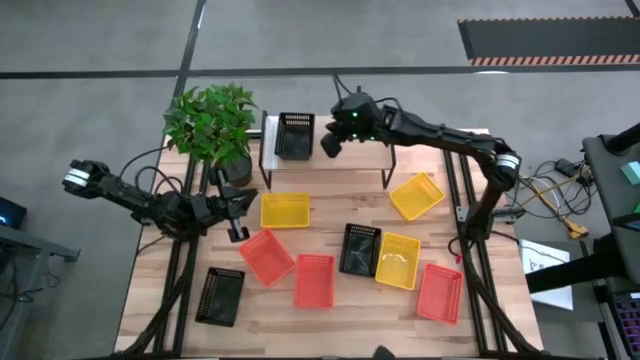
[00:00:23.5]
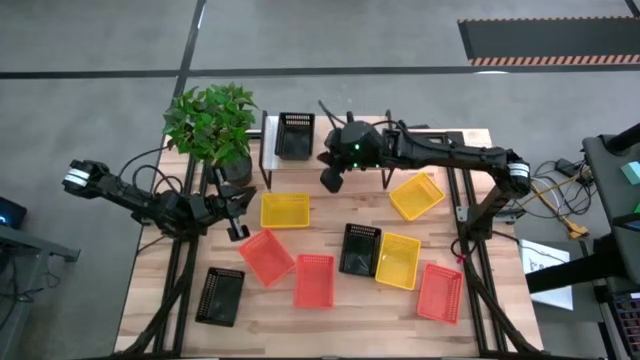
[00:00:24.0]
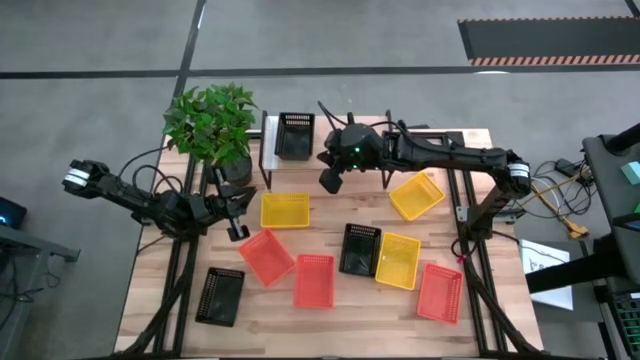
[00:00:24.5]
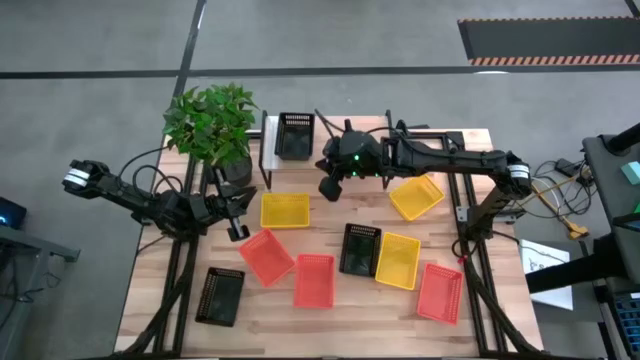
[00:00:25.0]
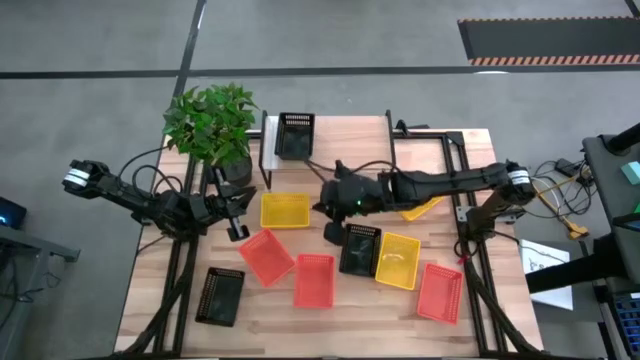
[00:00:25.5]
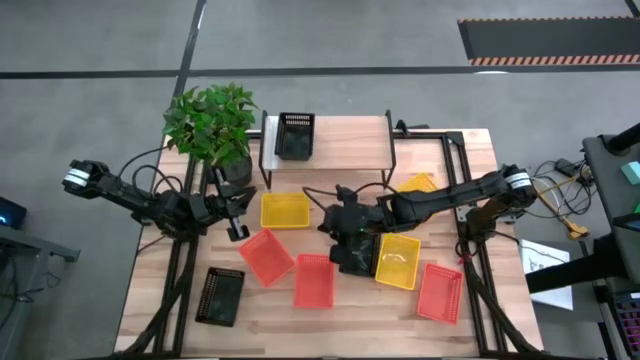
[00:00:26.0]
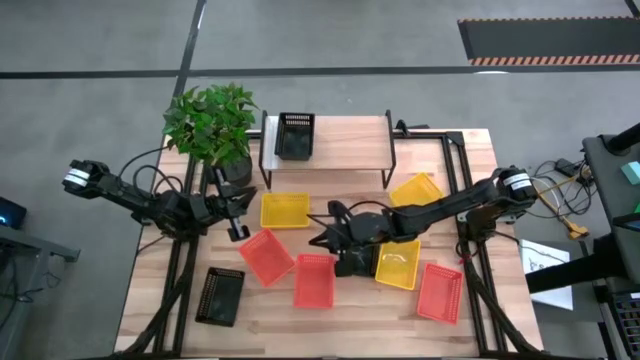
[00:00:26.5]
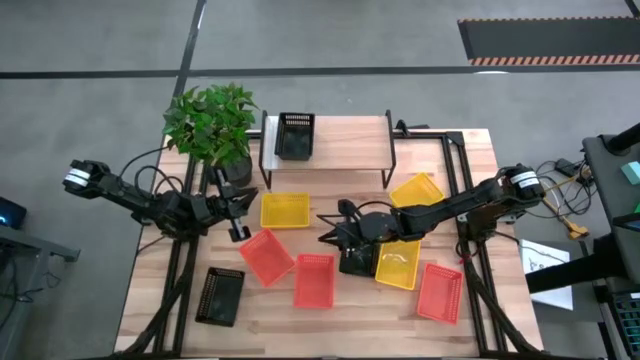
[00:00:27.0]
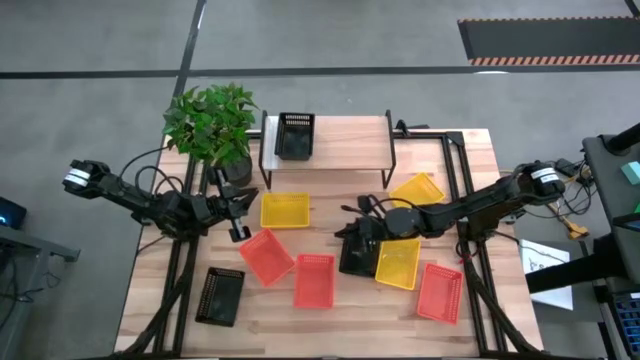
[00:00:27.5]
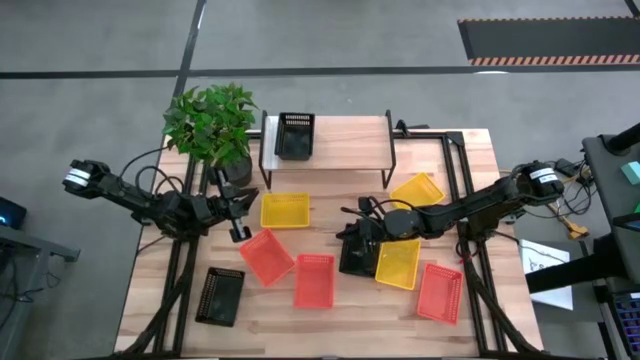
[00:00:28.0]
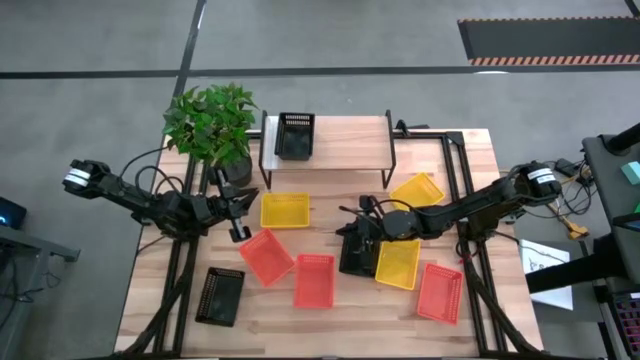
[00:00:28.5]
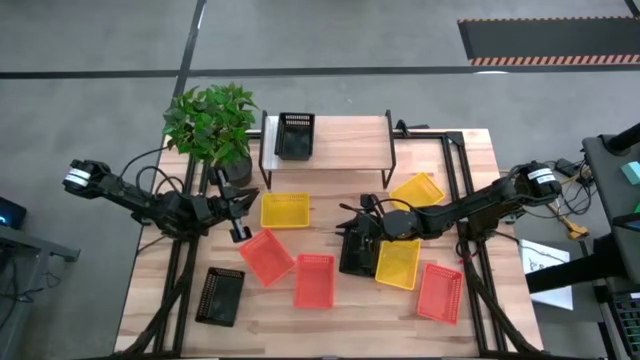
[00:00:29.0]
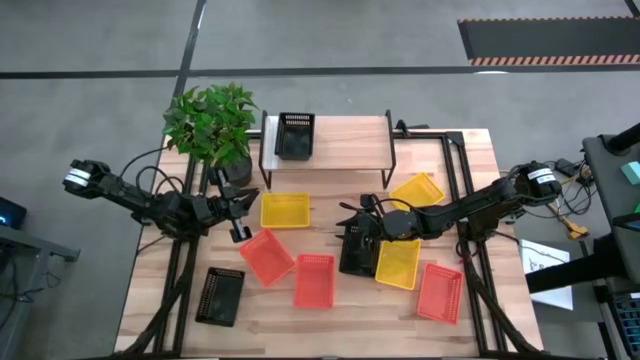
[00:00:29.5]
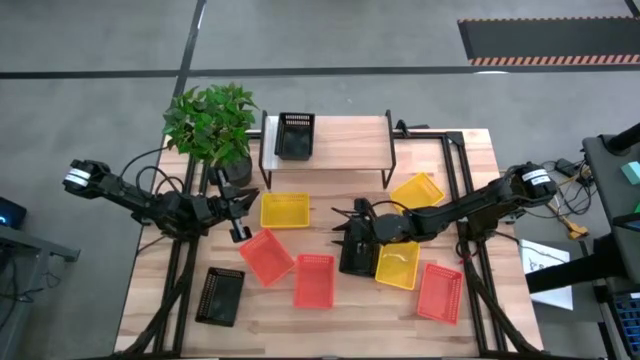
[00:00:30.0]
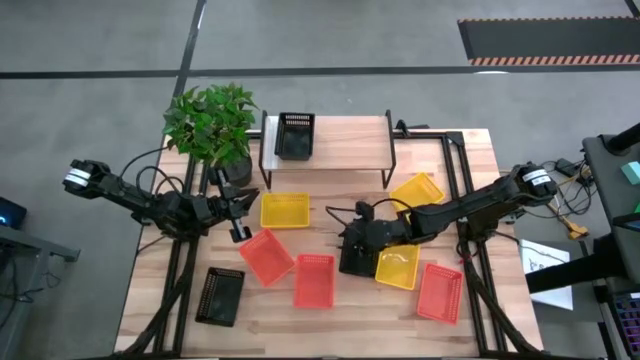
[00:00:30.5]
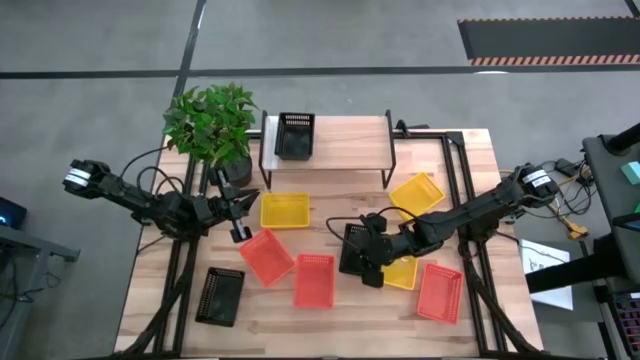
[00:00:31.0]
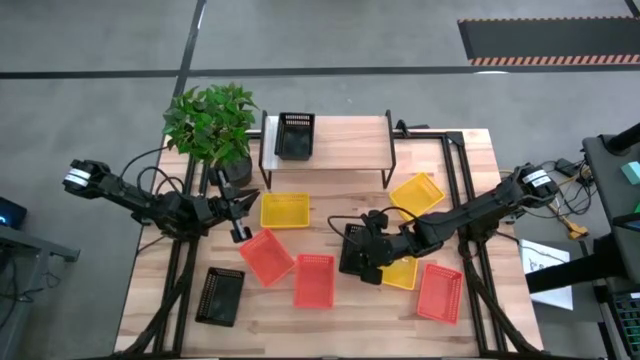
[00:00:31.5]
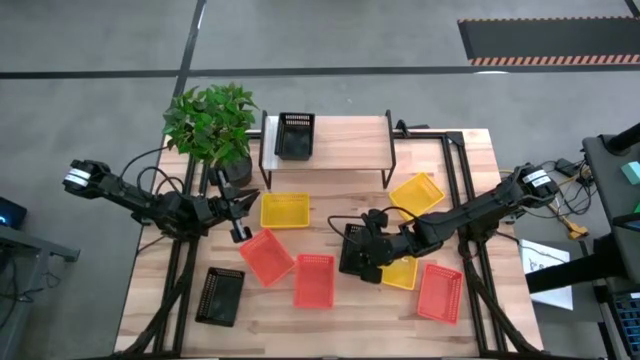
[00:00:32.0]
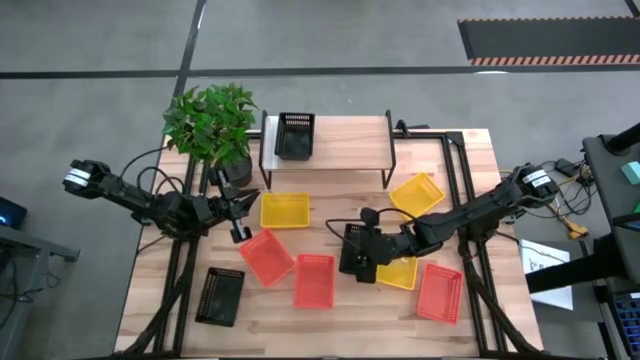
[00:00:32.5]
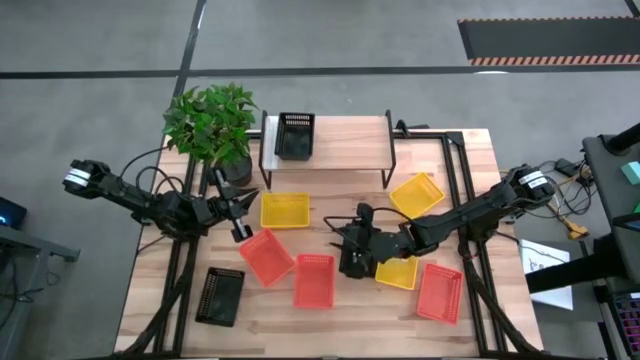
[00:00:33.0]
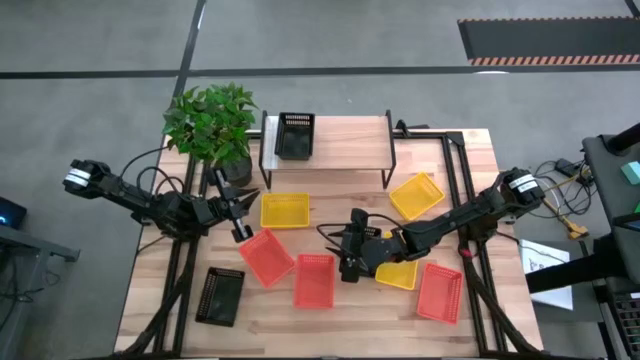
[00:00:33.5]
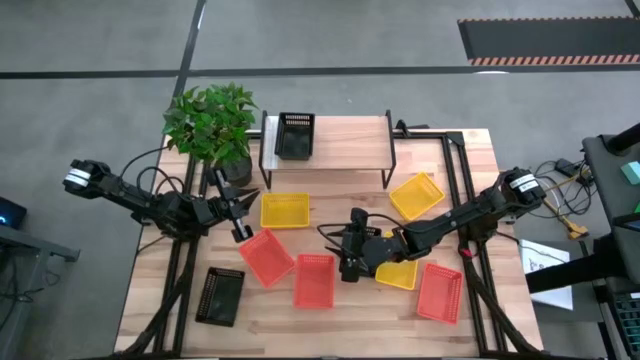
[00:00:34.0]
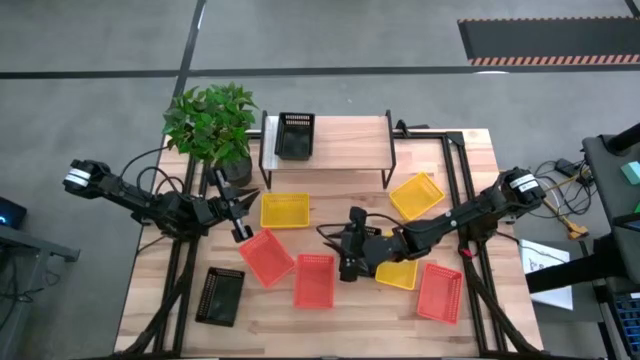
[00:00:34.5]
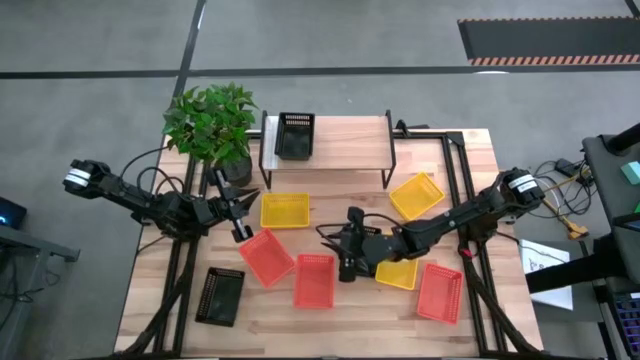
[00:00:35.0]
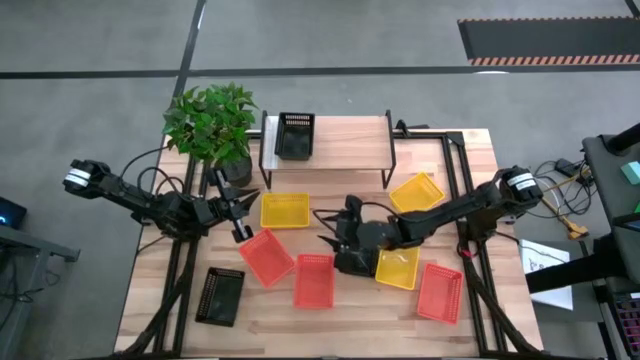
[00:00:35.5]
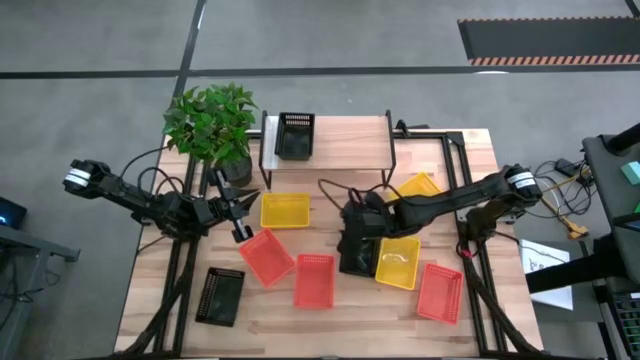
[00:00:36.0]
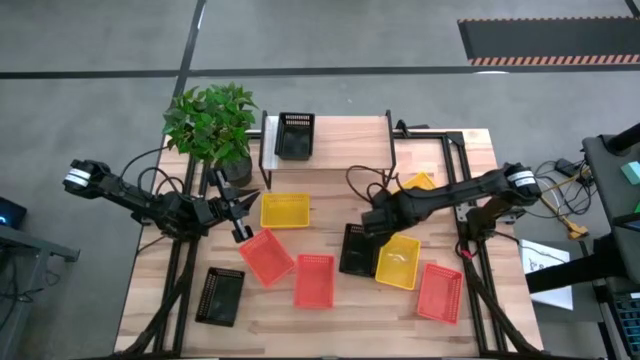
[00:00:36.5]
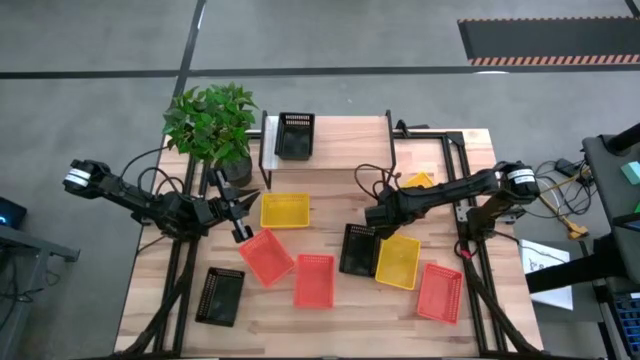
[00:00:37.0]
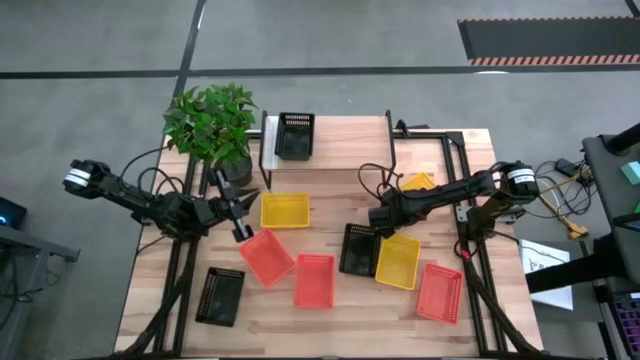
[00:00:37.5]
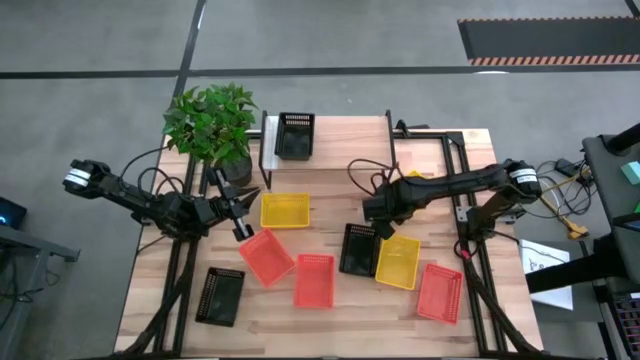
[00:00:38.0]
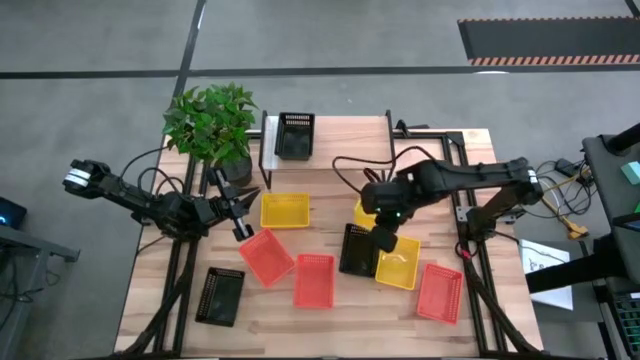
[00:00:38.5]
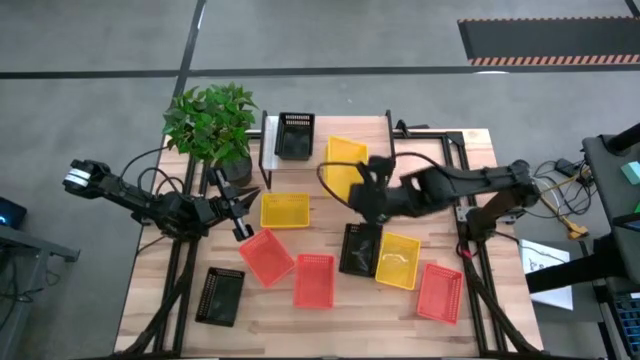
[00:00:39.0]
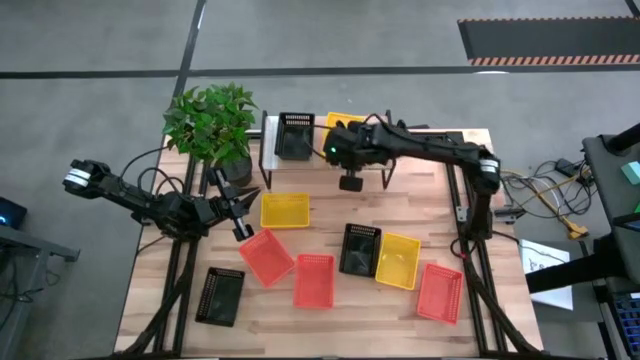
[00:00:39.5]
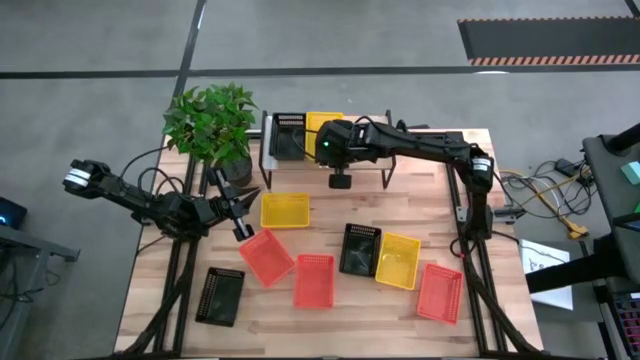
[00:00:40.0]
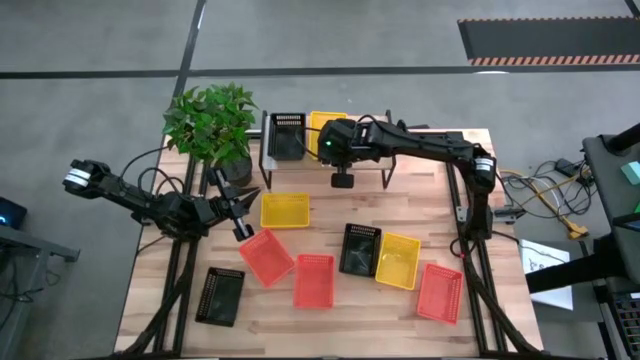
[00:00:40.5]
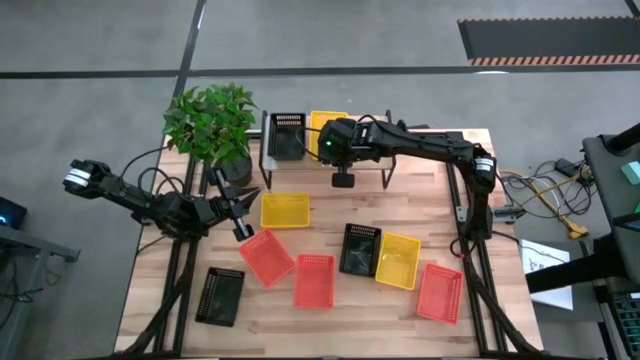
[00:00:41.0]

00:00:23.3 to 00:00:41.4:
Task: Stack baskets on shelf by color
Put the top right yellow bin on the shelf

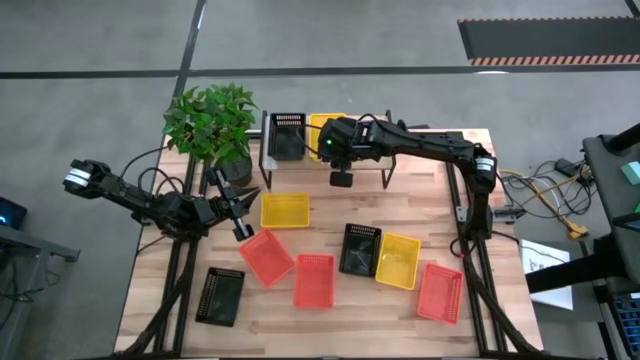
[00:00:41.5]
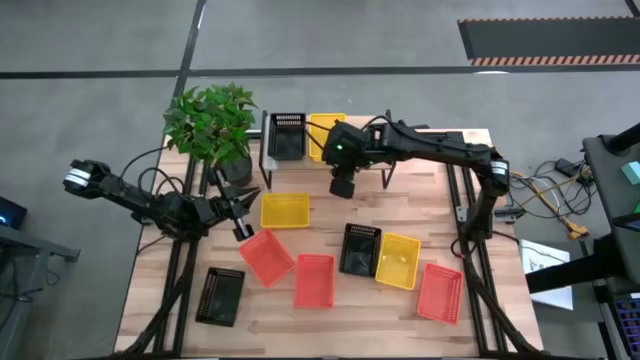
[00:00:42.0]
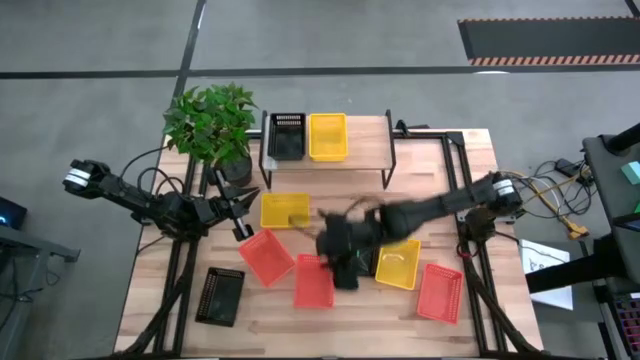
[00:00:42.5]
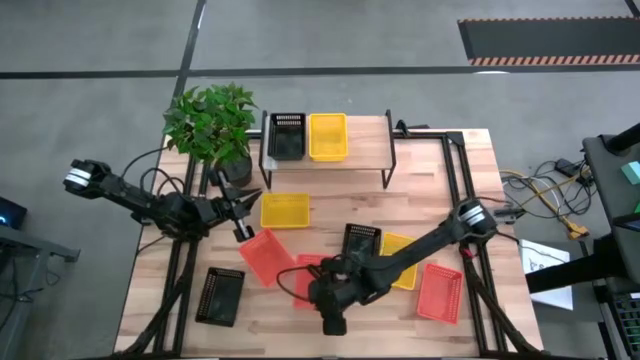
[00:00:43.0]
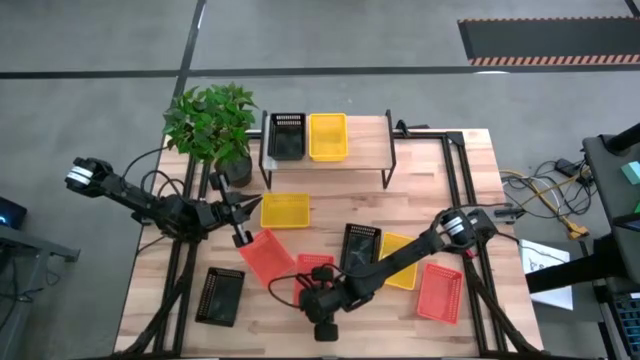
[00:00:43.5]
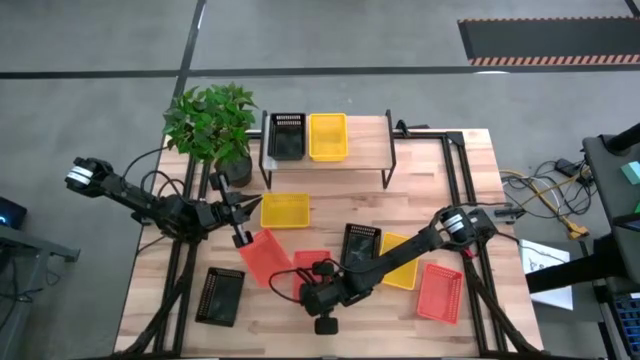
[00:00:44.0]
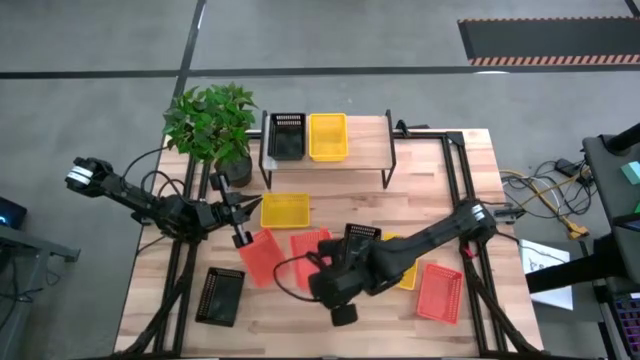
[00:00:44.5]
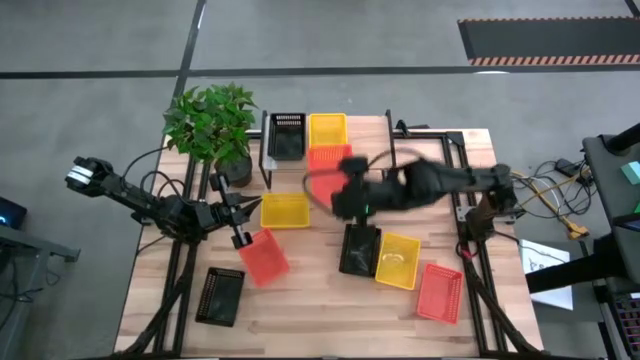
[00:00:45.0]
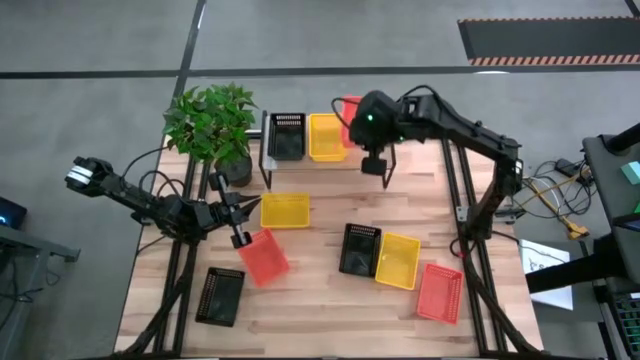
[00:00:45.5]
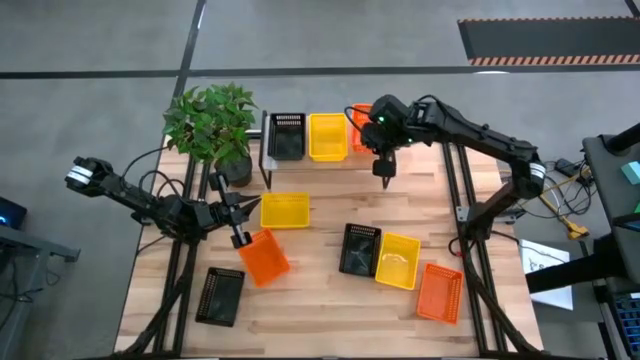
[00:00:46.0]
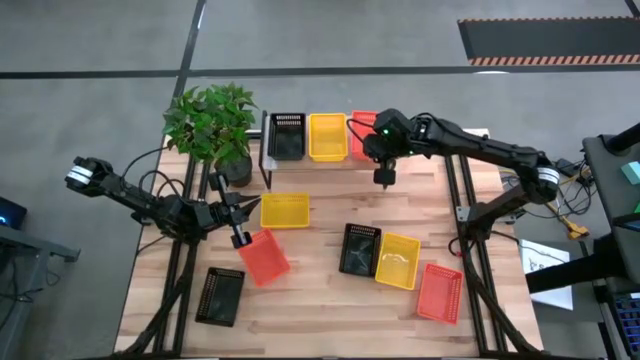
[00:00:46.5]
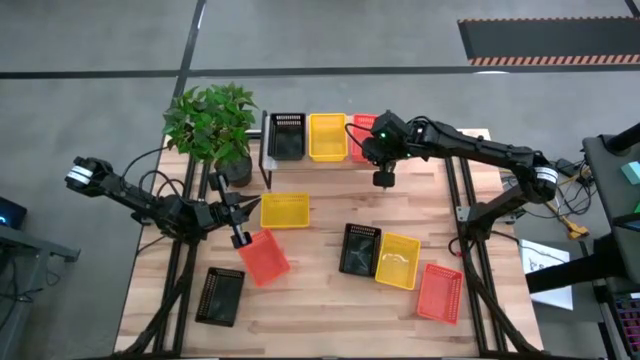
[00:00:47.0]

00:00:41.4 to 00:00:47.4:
Put the middle orange bin on the shelf
